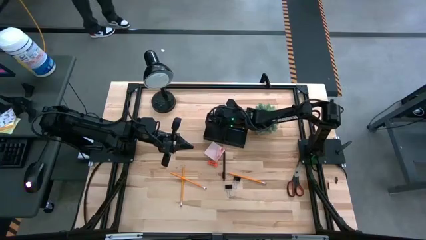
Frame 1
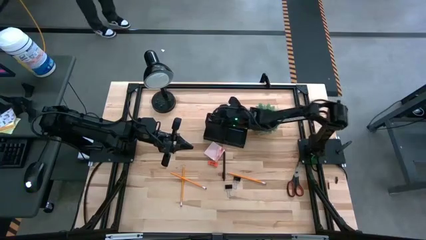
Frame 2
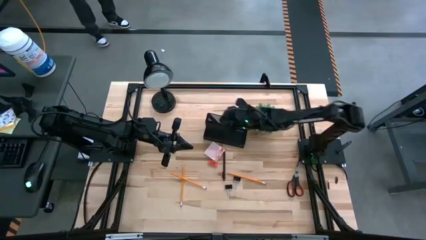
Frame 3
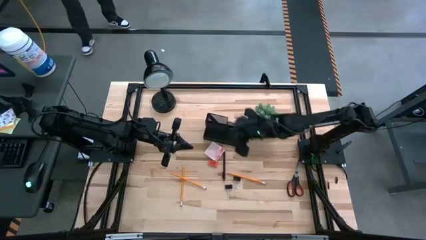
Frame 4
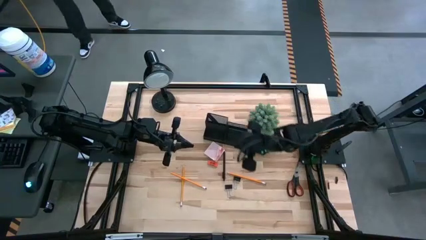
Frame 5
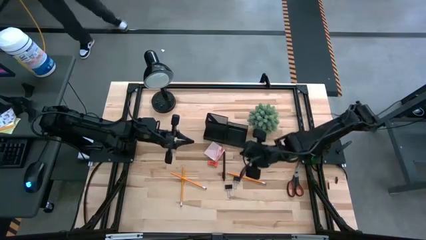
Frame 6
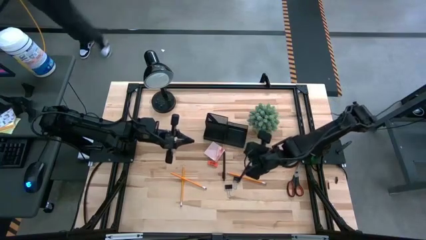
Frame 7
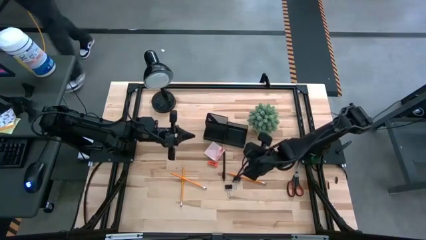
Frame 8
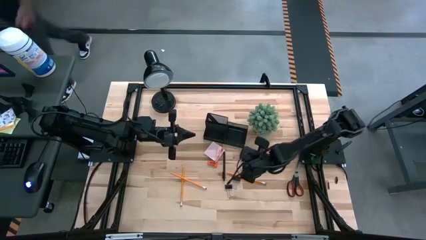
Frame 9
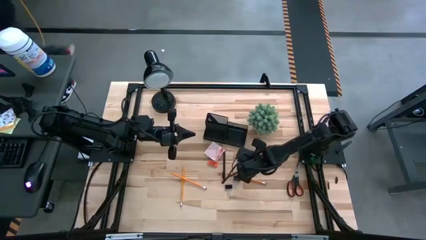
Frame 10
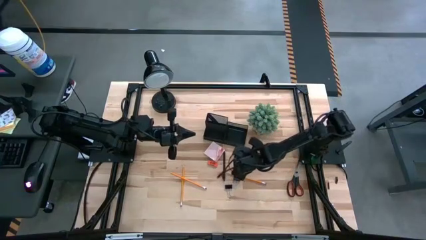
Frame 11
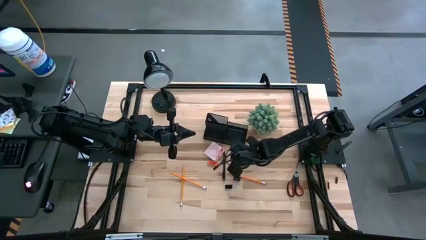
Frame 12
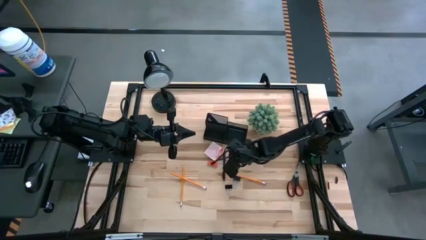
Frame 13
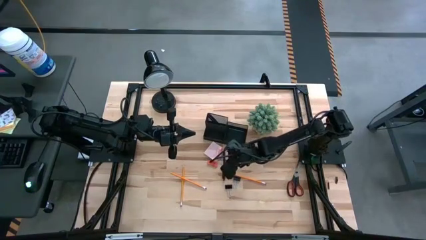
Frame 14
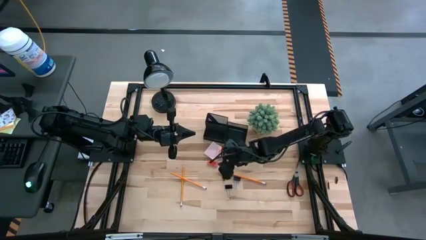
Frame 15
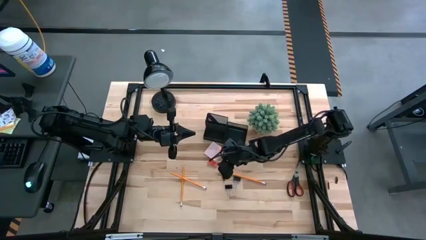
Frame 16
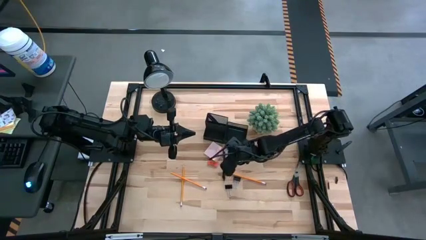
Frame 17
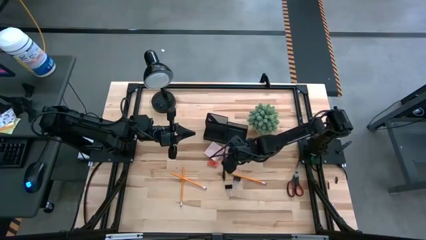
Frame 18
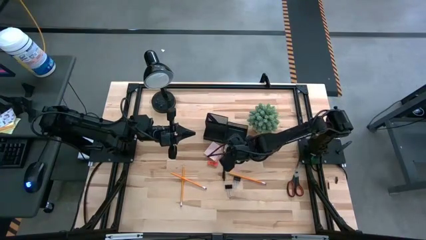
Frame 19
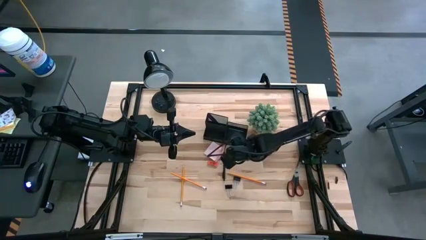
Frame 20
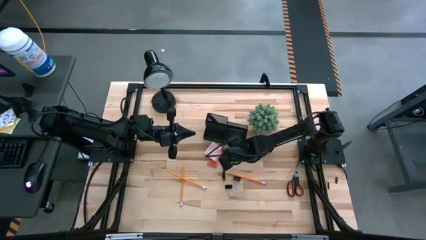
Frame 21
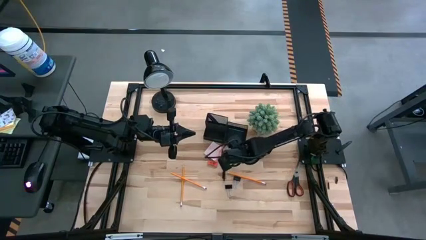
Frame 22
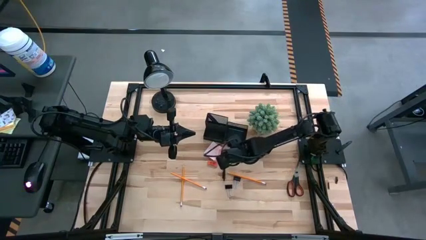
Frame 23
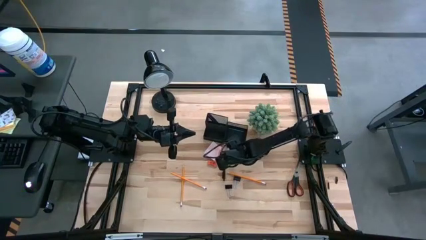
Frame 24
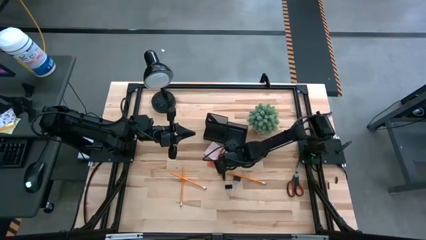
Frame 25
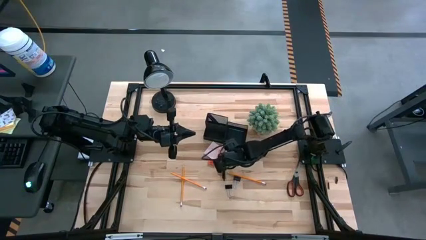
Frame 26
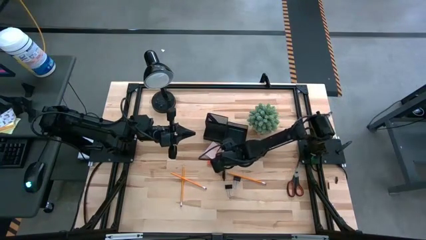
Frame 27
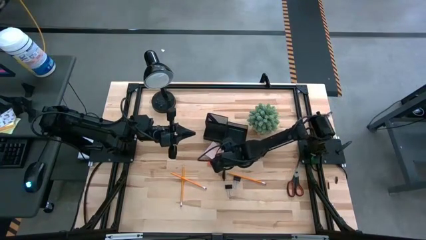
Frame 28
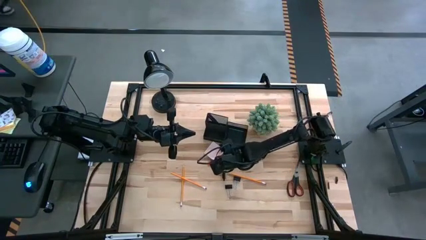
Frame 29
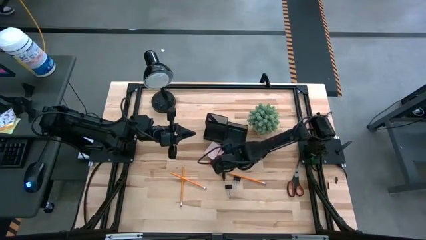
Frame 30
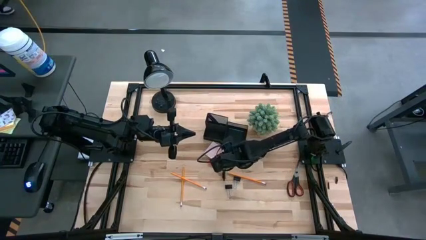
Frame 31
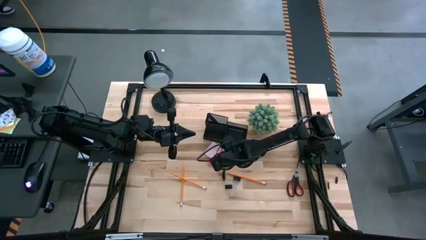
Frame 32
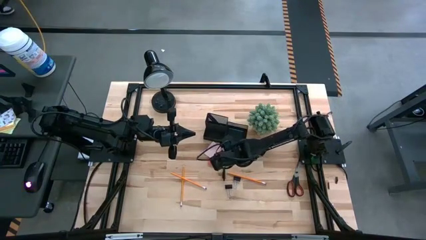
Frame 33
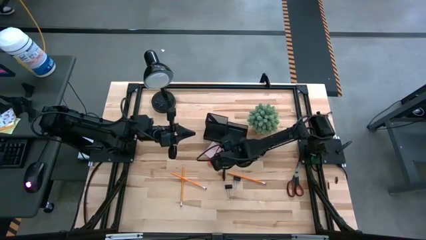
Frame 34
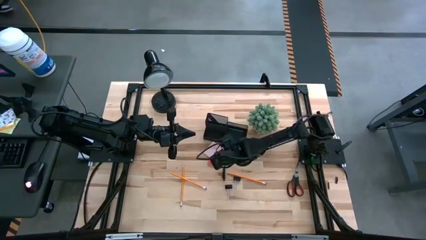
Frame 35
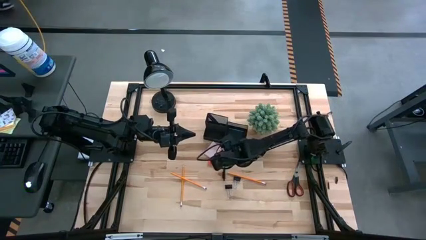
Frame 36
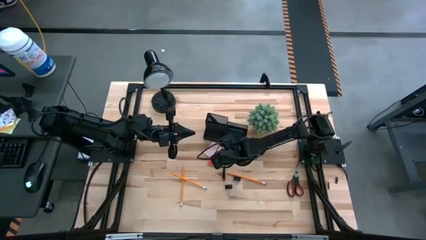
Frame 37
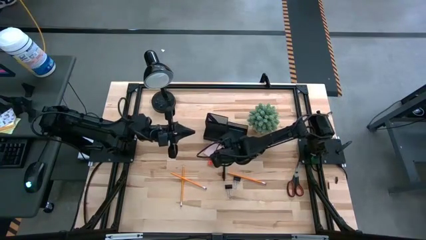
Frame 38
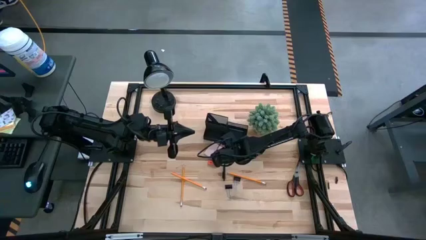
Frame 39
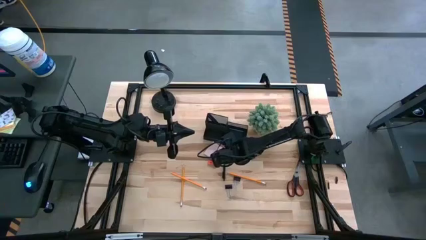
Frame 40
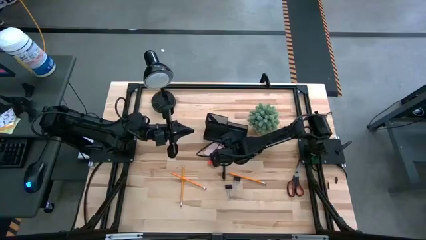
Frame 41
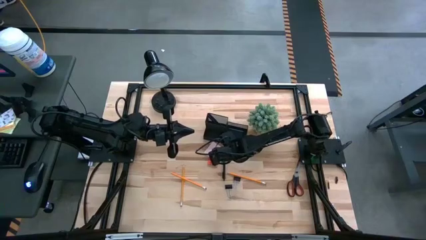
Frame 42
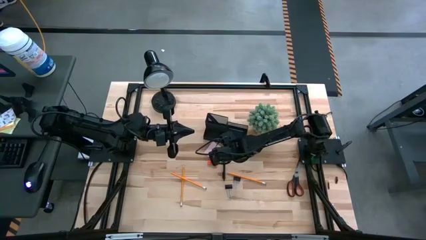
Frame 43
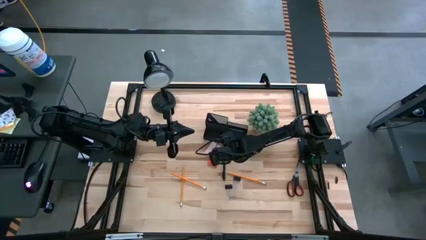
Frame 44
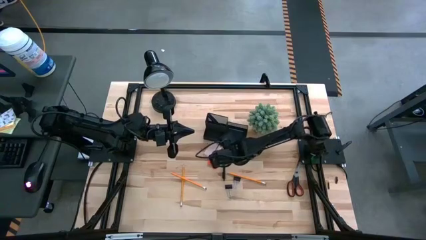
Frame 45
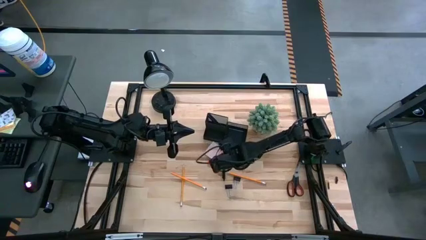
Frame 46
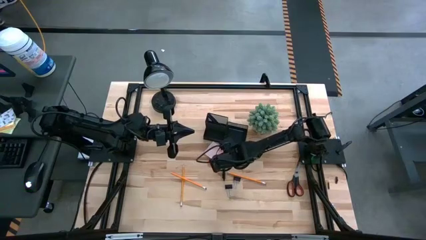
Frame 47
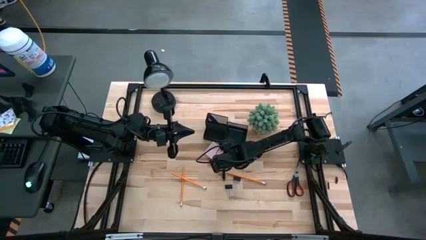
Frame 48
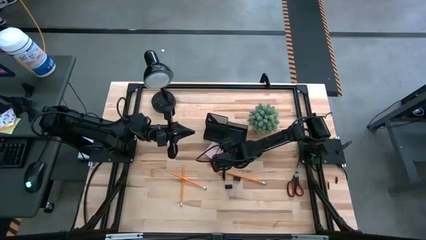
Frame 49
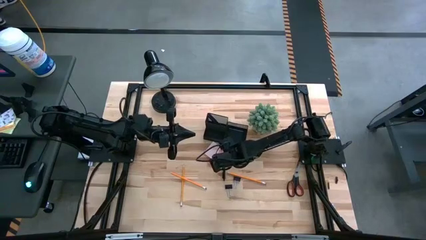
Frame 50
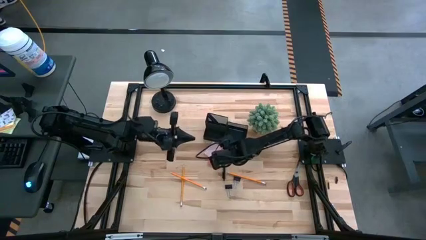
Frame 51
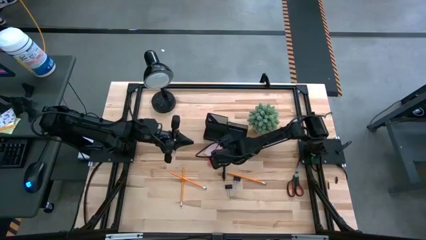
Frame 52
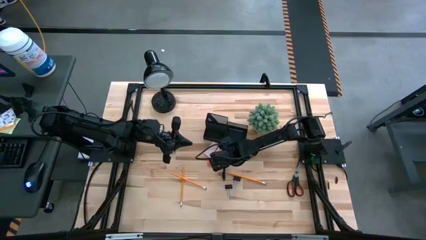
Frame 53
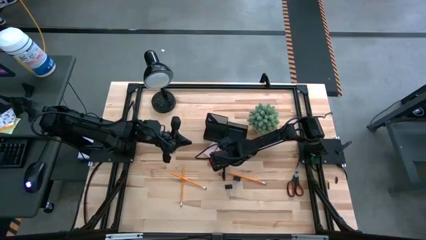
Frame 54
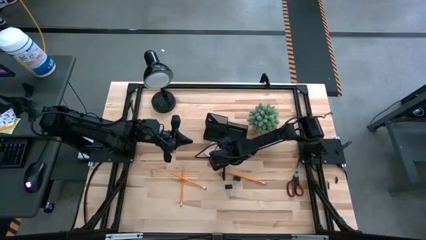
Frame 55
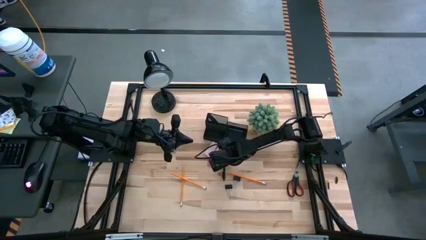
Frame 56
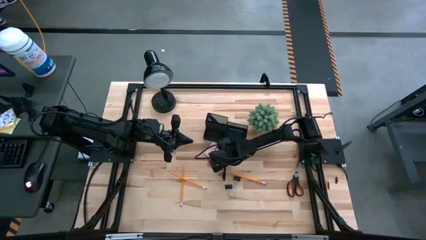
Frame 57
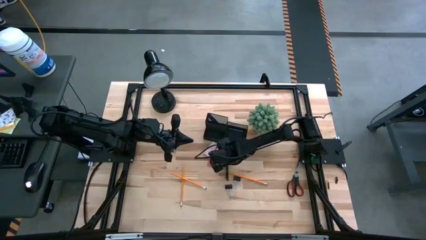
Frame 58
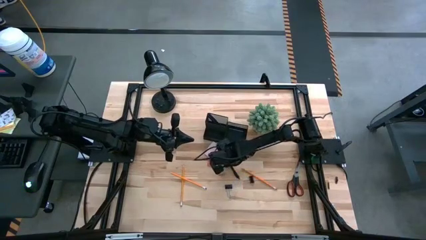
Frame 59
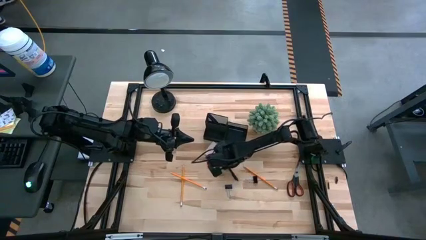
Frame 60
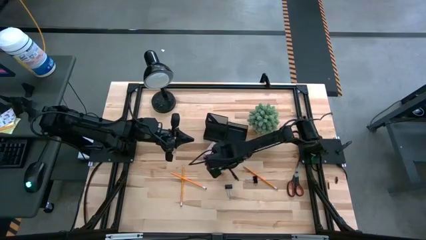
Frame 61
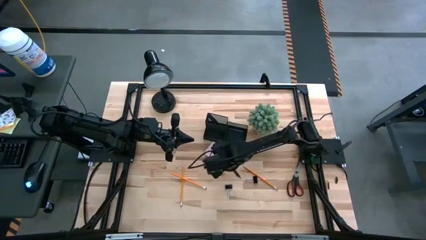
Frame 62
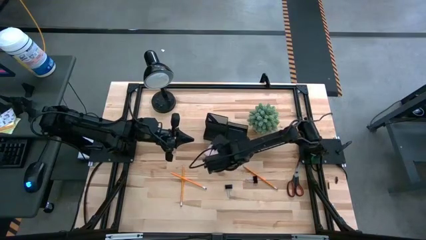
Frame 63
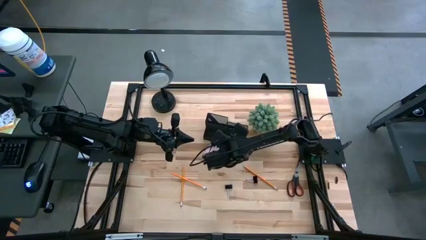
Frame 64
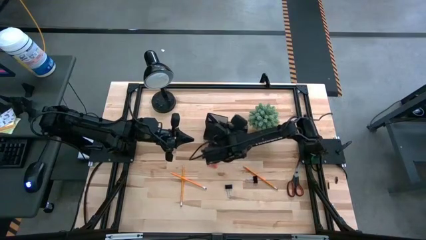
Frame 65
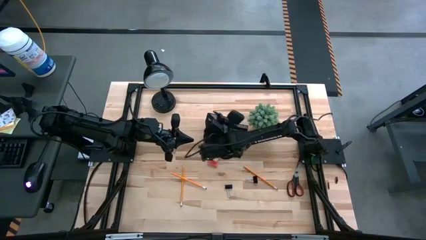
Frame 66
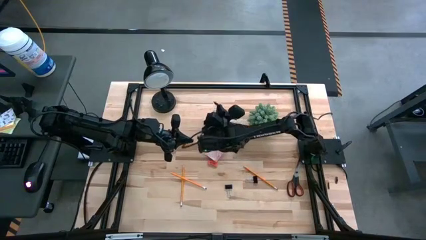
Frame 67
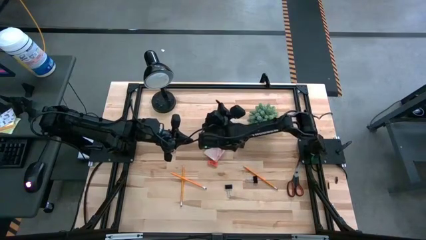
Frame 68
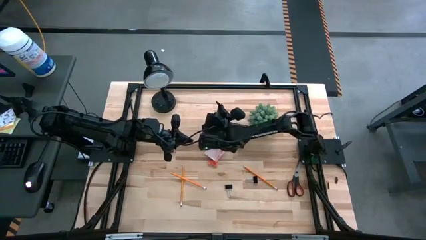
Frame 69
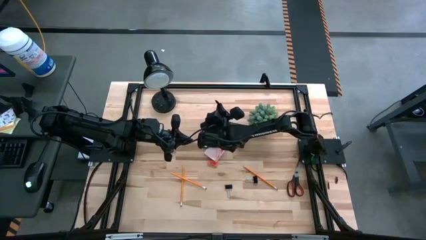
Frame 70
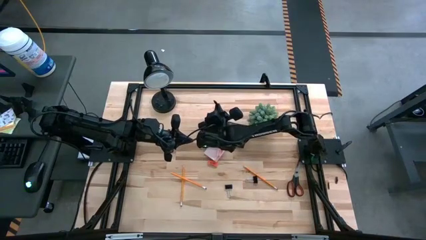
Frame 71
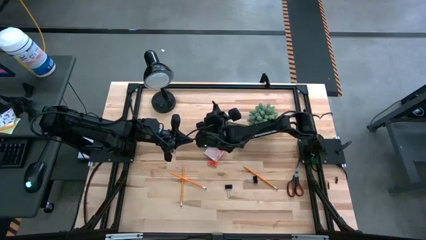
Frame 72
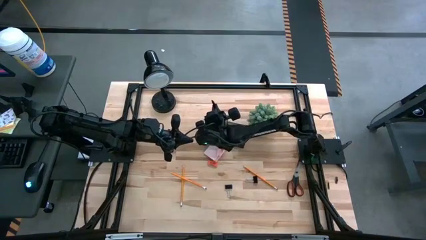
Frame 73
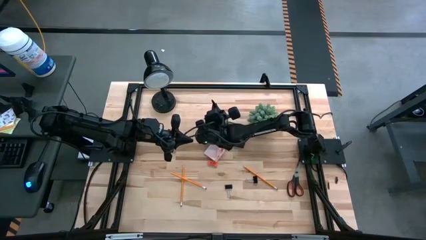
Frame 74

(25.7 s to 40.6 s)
Task: Pick and place office supplies into organizer
Put the black pen into the black desk organizer
